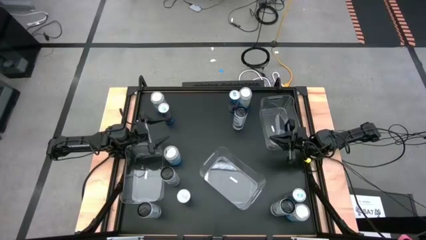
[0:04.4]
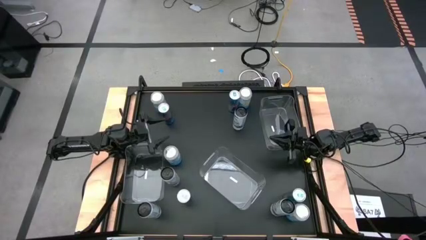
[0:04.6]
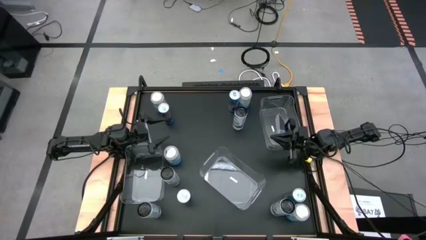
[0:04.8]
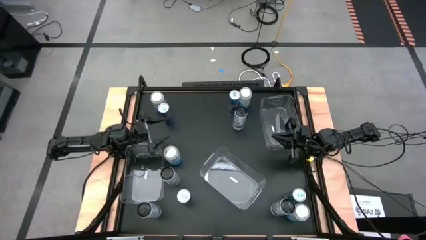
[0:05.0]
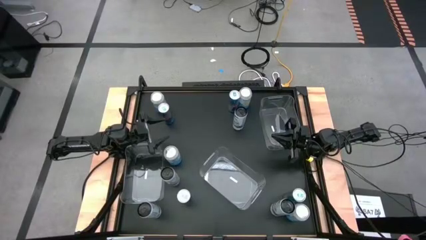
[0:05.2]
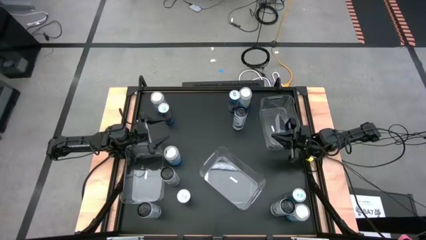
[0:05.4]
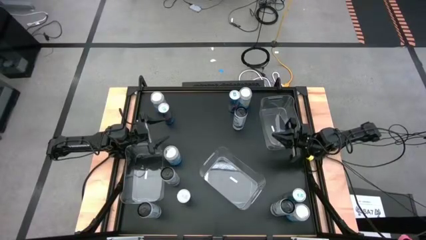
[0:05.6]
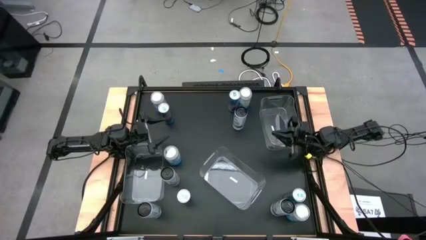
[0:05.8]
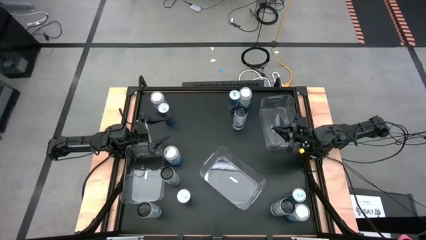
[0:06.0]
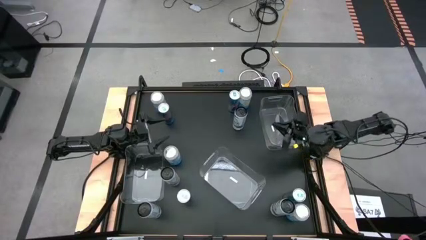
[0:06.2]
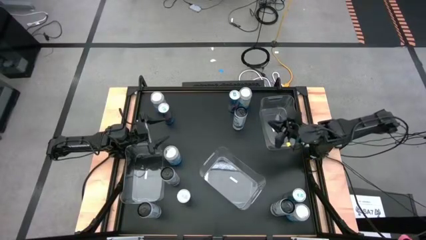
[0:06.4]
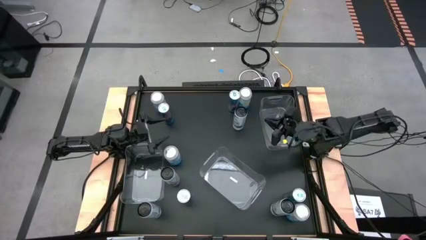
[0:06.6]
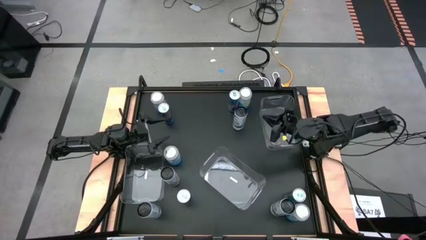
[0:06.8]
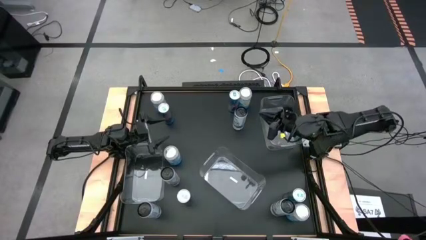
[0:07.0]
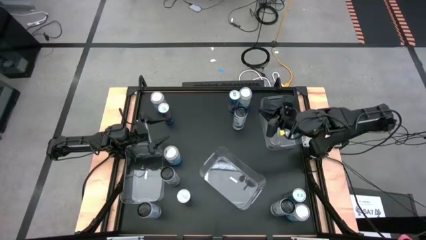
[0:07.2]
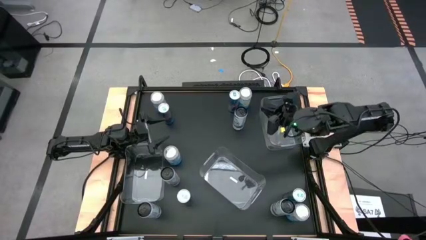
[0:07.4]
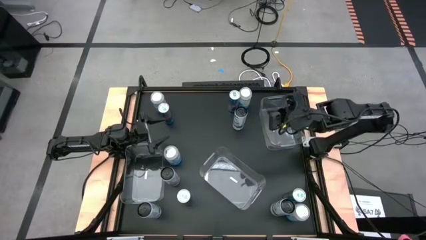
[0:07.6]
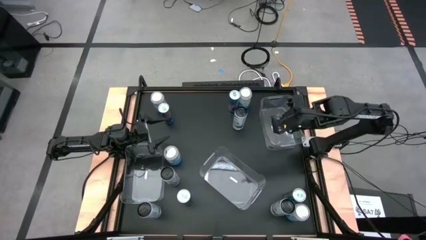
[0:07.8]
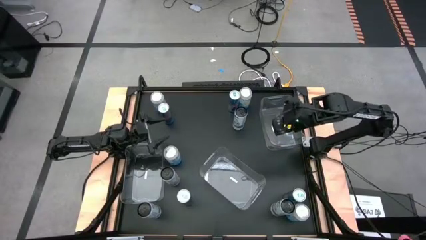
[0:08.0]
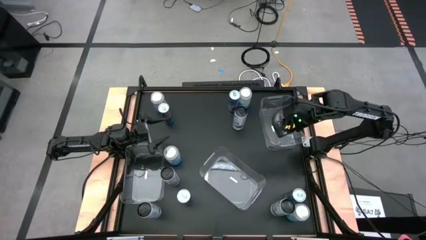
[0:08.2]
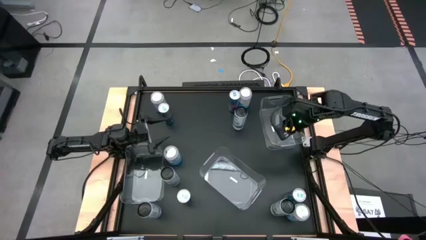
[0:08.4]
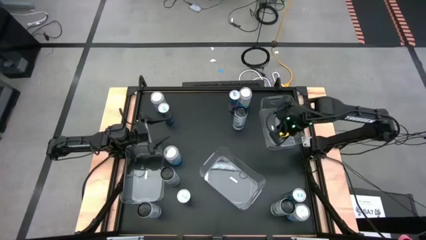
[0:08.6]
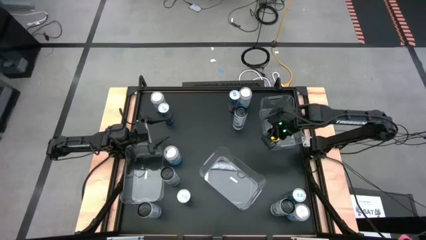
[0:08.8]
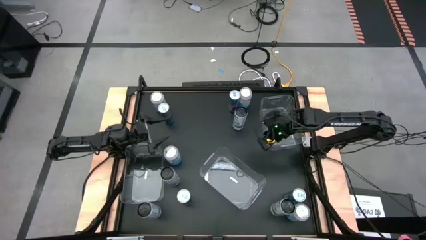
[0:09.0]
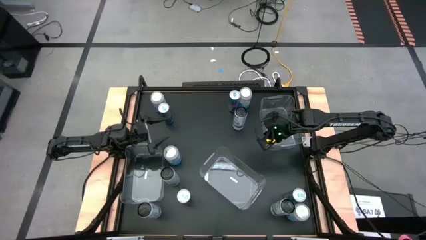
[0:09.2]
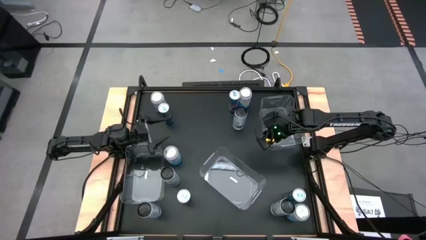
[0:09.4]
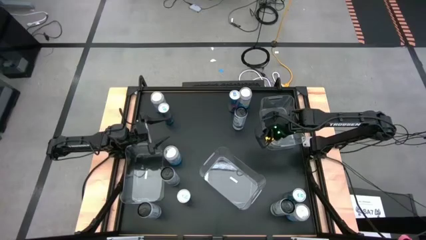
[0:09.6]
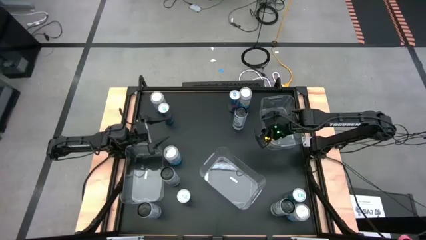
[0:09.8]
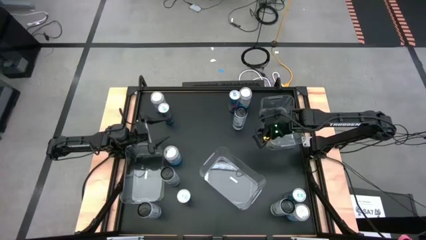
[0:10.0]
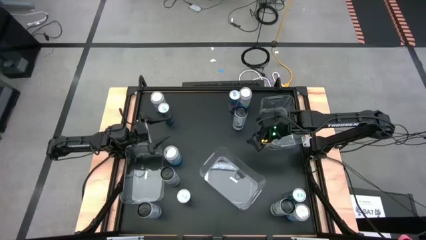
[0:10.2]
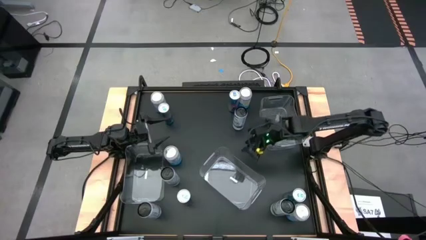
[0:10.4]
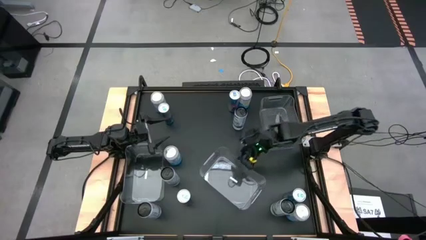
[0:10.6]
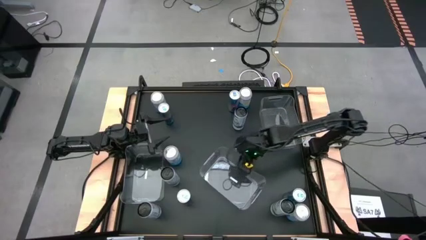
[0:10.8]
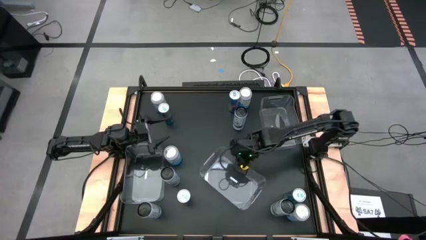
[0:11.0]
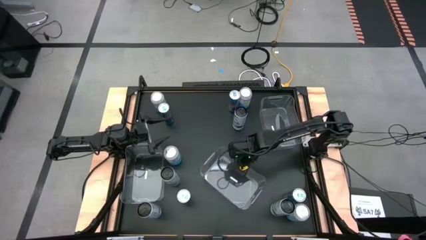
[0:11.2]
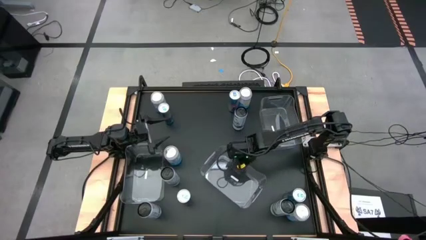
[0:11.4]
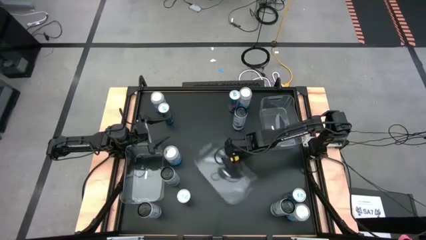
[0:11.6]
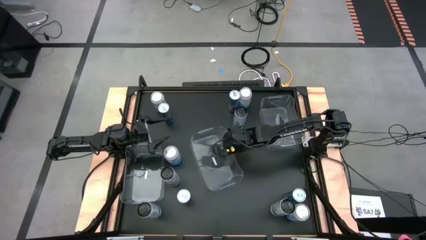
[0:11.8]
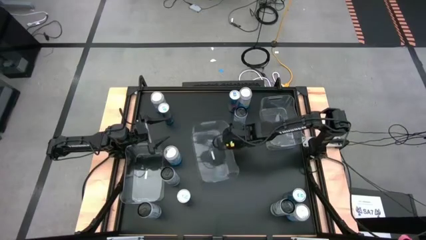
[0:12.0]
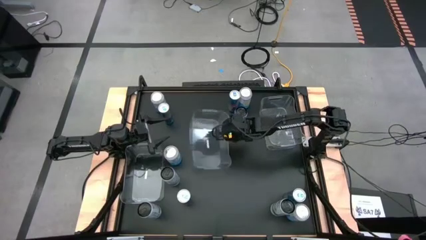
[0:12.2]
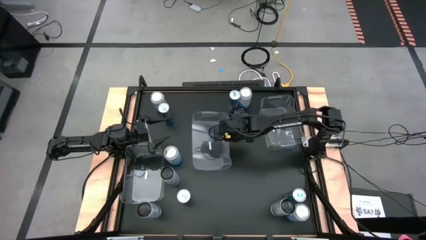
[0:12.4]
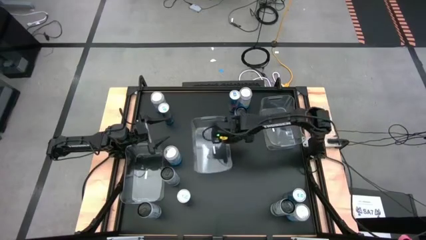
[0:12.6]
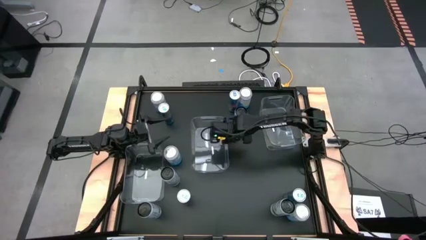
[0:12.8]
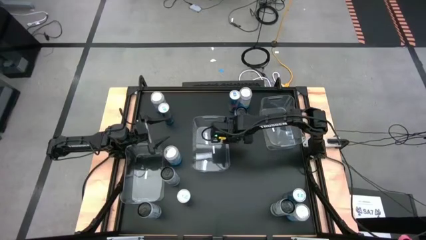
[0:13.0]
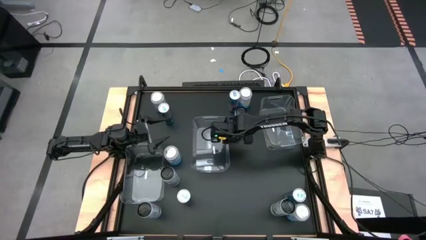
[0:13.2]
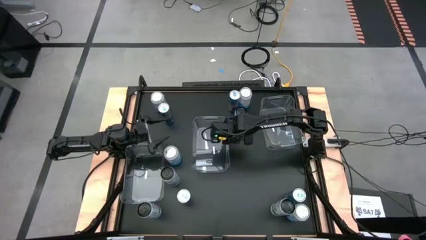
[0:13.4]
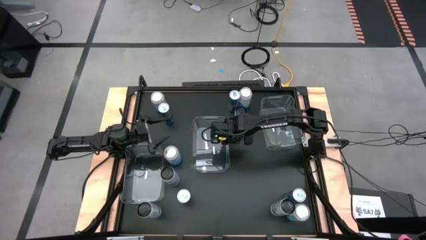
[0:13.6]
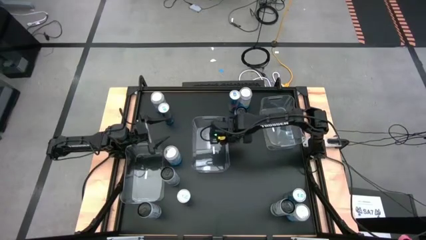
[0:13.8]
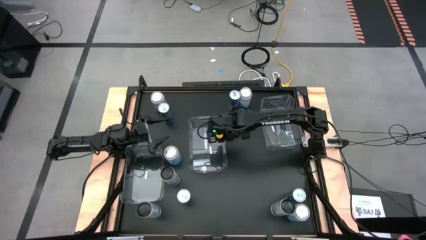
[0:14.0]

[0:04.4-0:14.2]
Task: Sort soda cans
Adjust the middle transparent bin

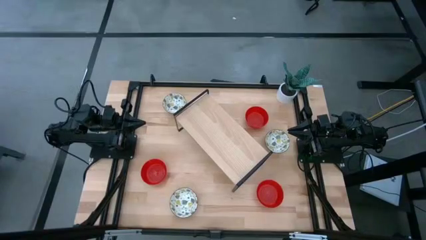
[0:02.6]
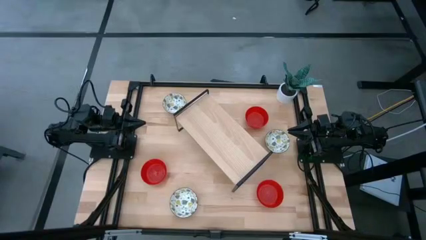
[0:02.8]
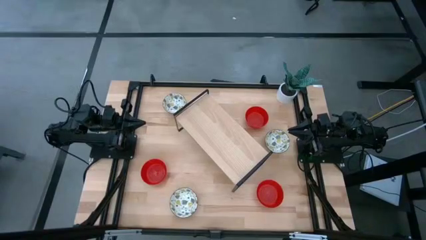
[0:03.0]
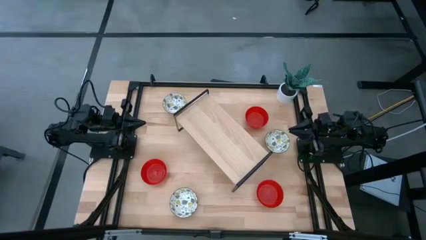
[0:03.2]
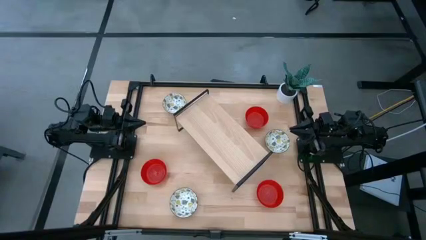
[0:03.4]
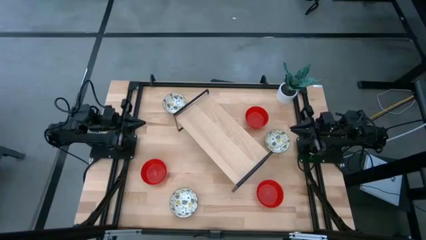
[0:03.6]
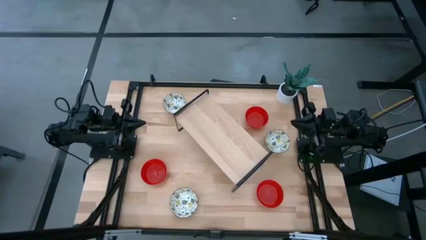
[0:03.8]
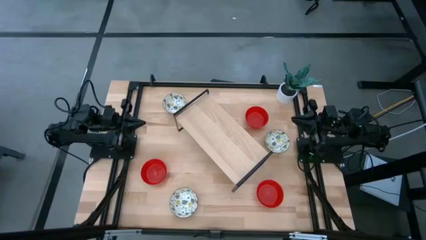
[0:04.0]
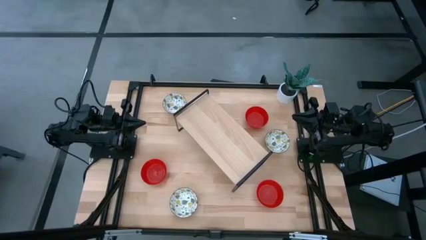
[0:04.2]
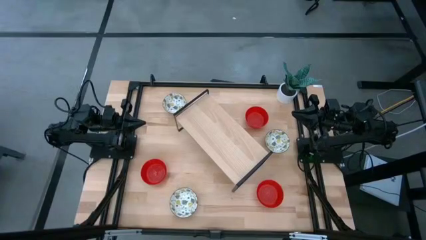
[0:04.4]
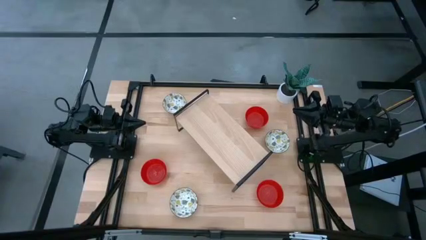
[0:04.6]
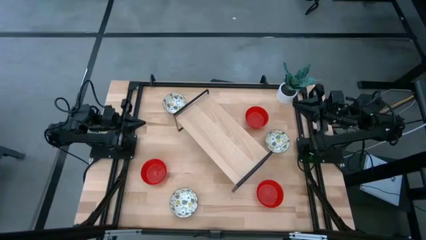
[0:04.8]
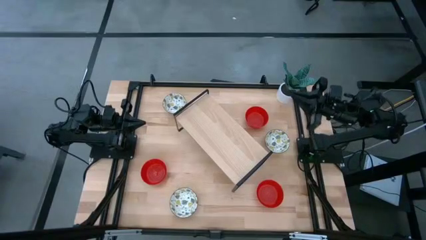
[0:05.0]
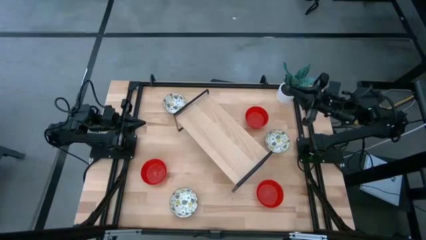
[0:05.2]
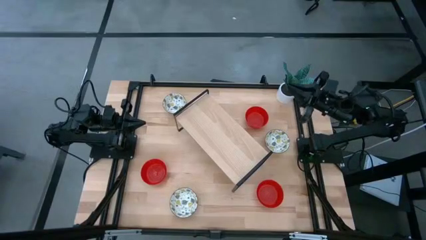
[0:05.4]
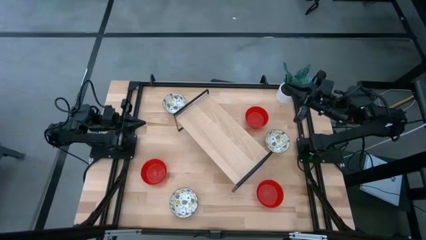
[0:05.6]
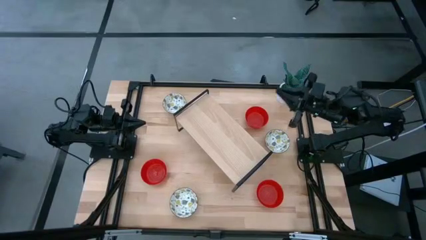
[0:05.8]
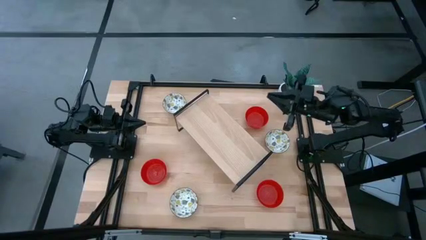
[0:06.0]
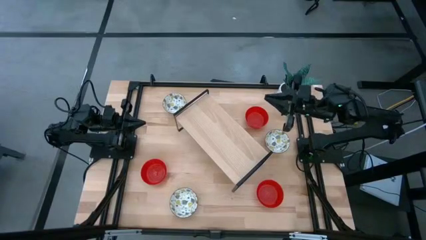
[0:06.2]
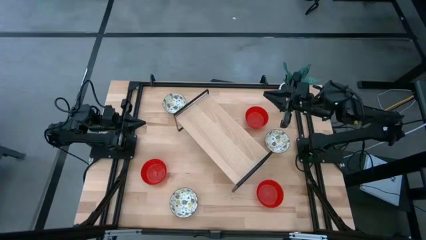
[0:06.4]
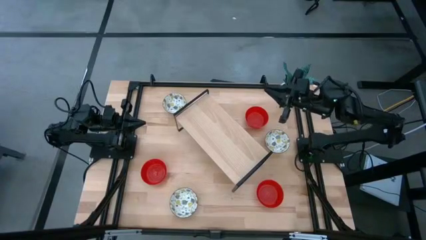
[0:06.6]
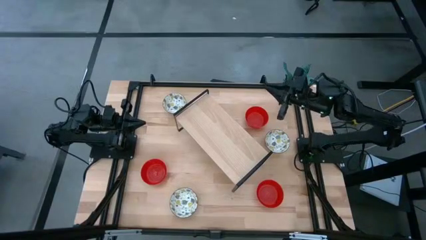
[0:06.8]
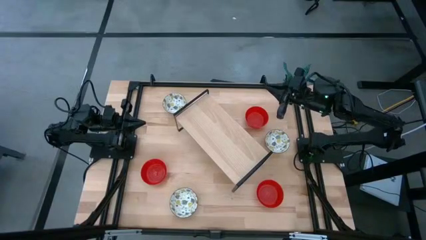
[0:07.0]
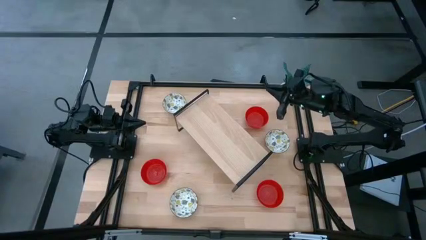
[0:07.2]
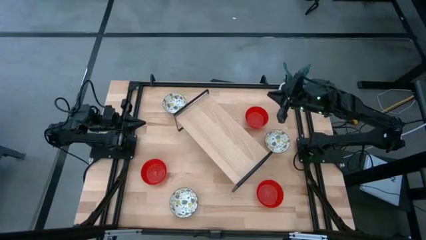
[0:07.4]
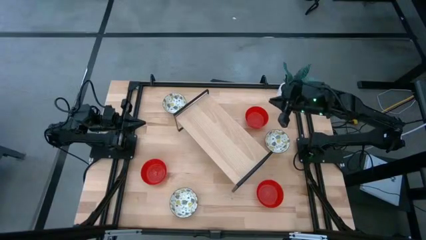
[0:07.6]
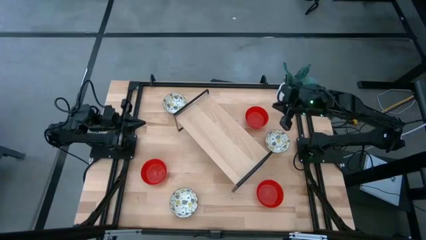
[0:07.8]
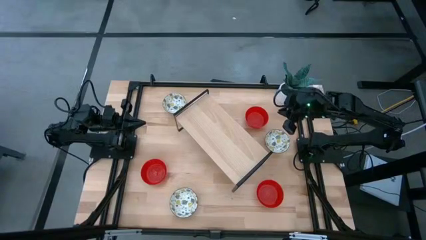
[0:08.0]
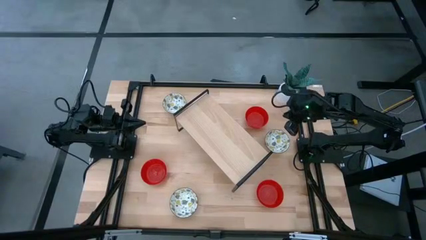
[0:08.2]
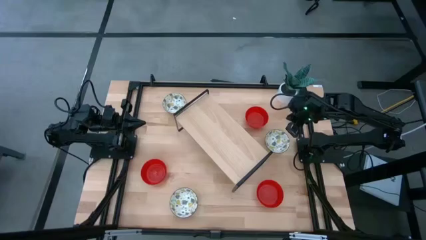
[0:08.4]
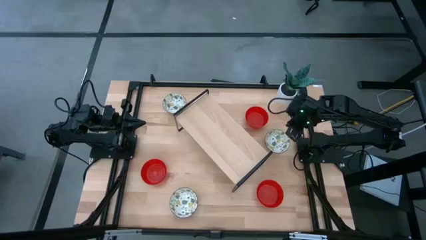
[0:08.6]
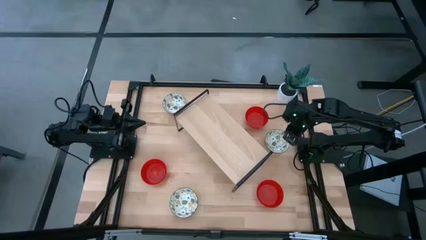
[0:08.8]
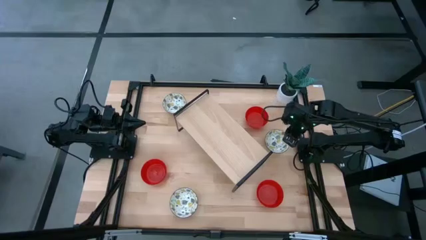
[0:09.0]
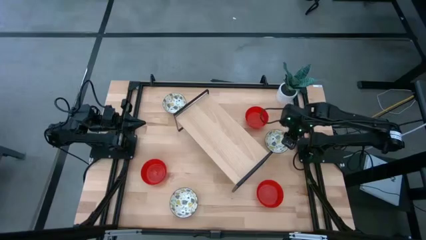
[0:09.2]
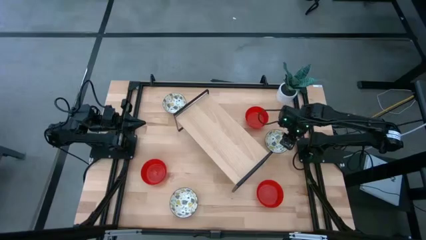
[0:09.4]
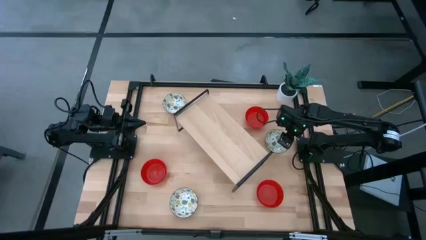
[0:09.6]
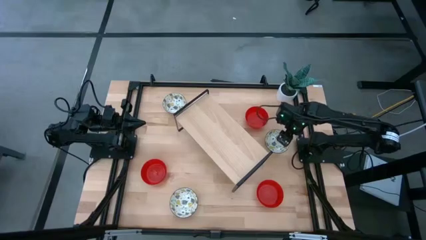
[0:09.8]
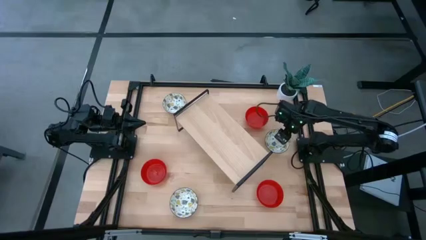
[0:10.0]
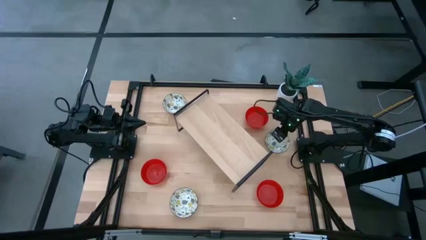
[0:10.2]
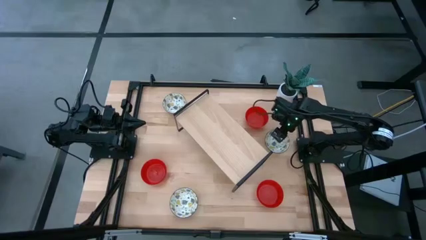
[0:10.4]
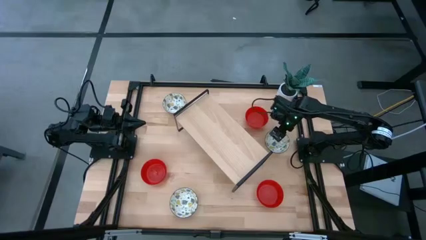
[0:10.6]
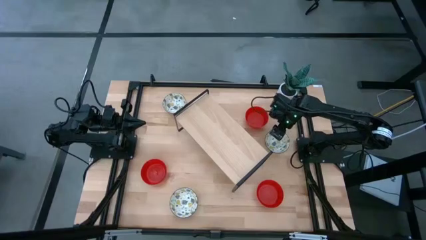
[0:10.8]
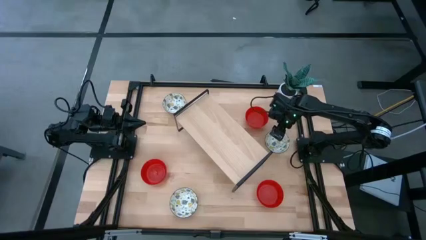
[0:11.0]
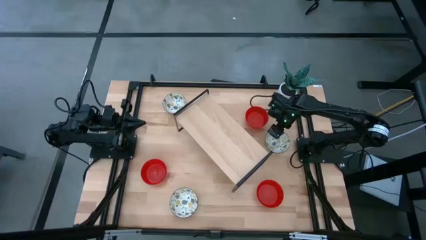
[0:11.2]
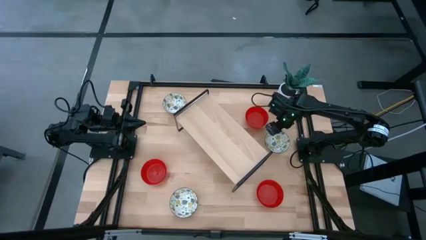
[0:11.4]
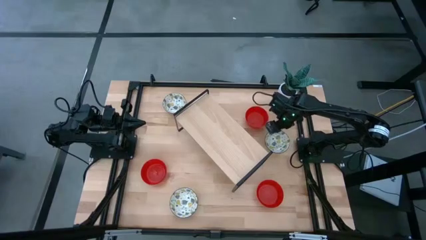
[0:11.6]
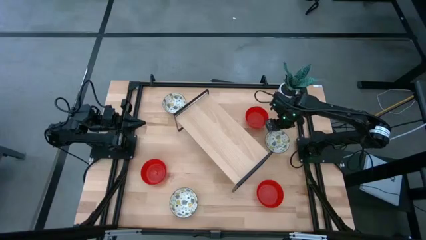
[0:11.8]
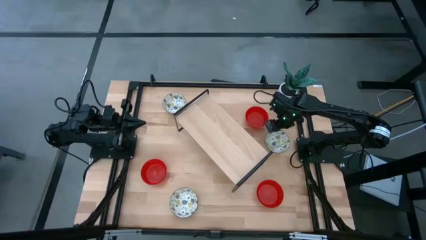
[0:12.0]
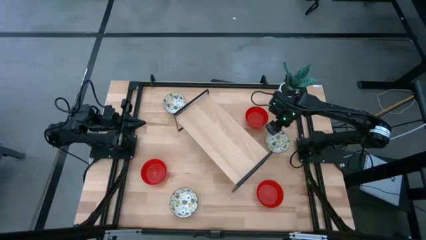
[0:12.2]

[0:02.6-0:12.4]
Task: Pick & Place Mini bowls
Put the middle white patterned bowl on the shelf
